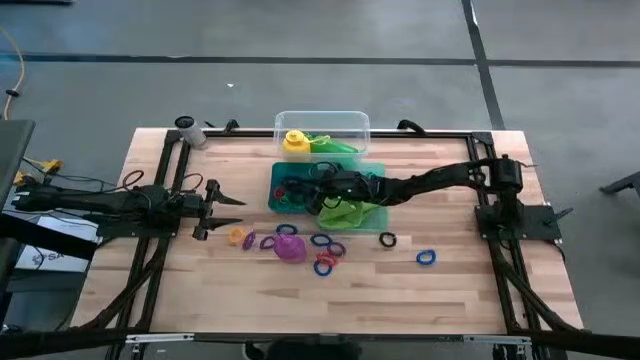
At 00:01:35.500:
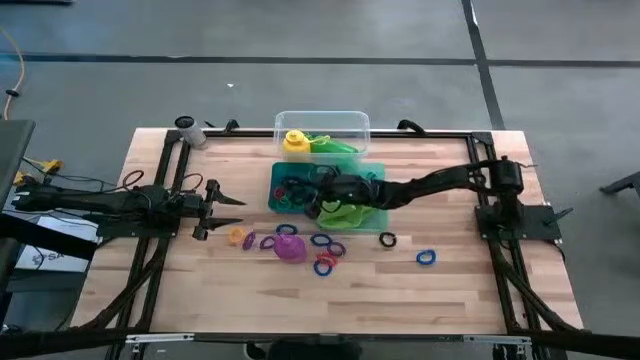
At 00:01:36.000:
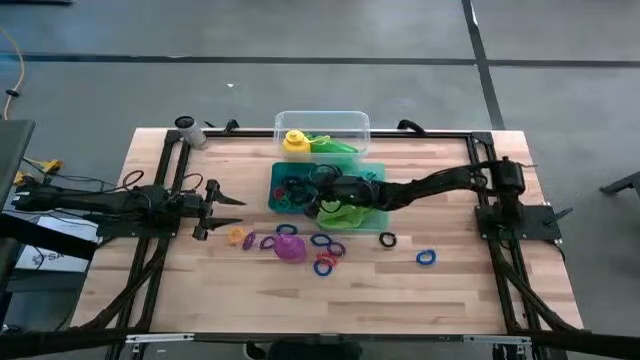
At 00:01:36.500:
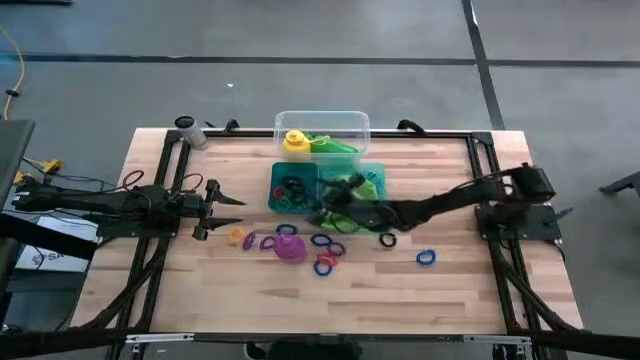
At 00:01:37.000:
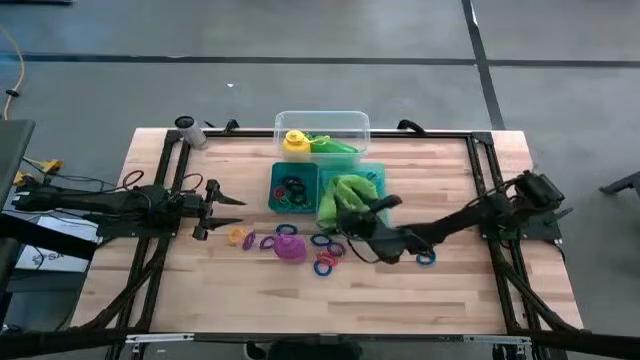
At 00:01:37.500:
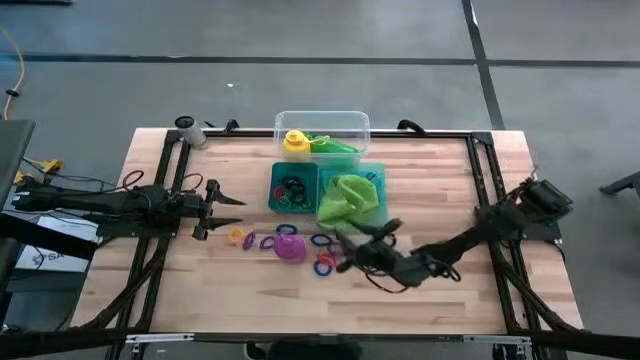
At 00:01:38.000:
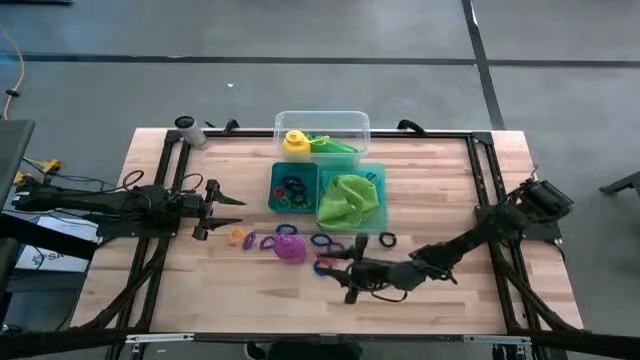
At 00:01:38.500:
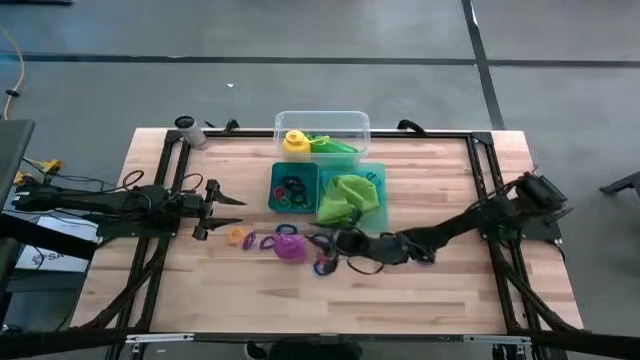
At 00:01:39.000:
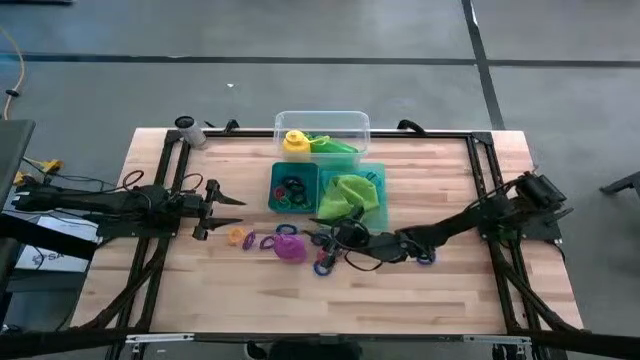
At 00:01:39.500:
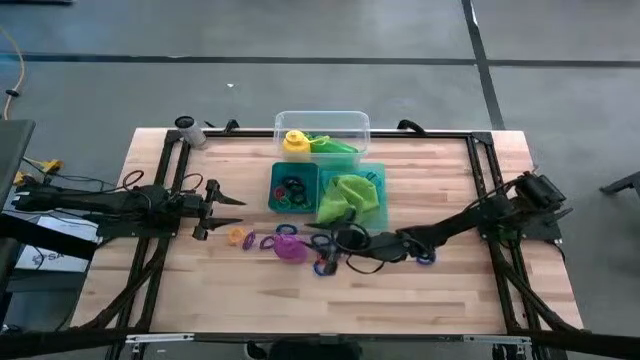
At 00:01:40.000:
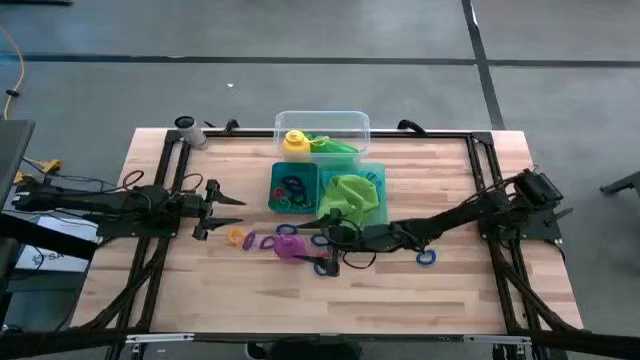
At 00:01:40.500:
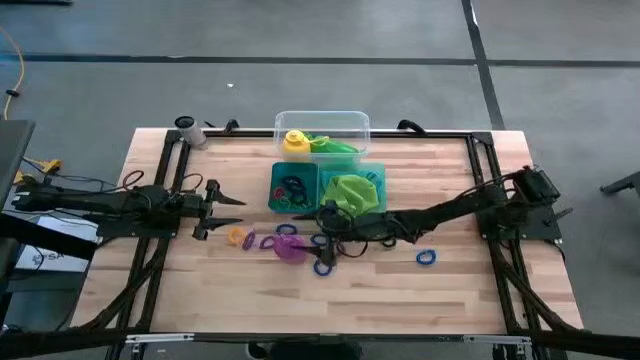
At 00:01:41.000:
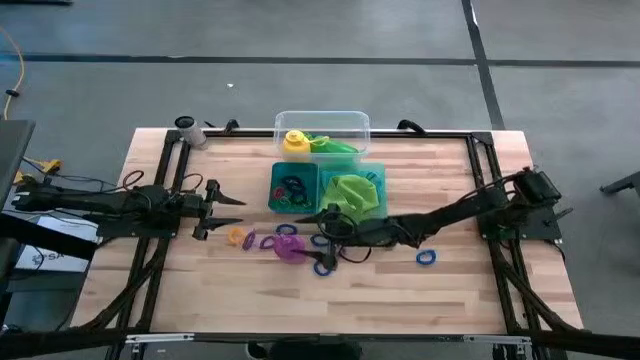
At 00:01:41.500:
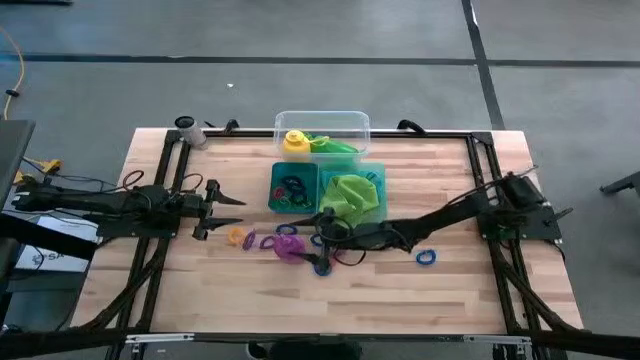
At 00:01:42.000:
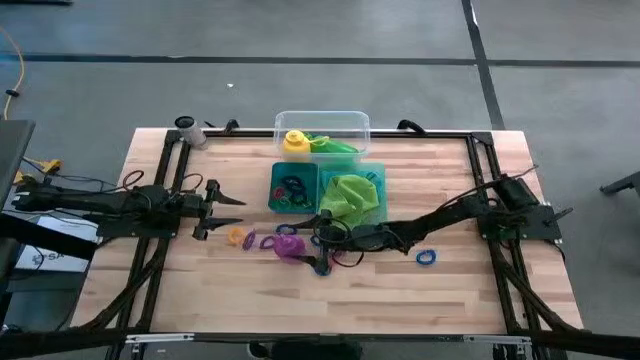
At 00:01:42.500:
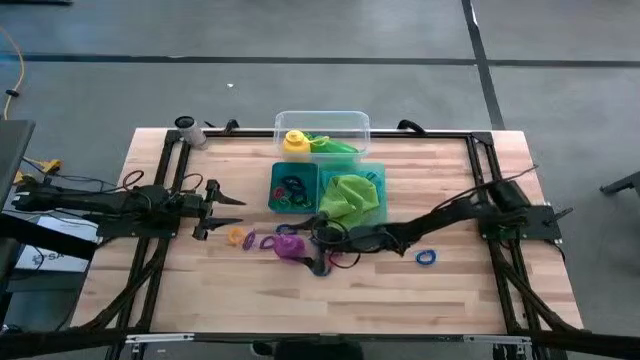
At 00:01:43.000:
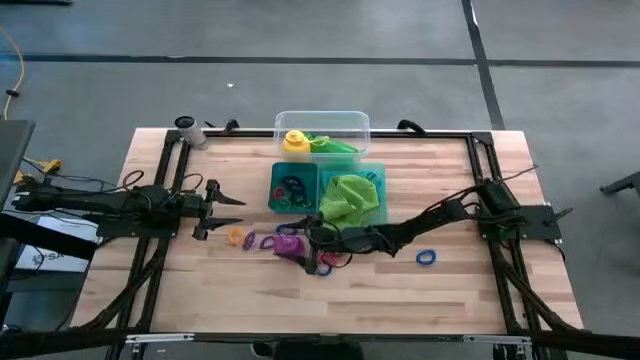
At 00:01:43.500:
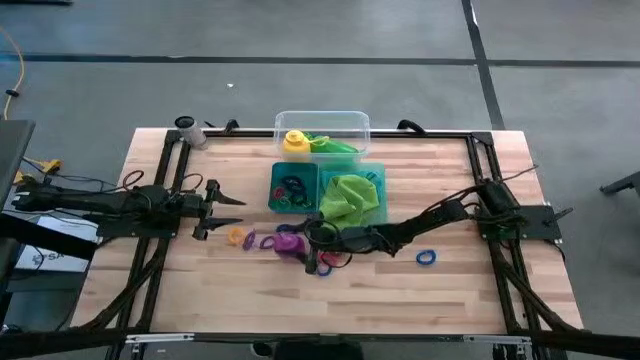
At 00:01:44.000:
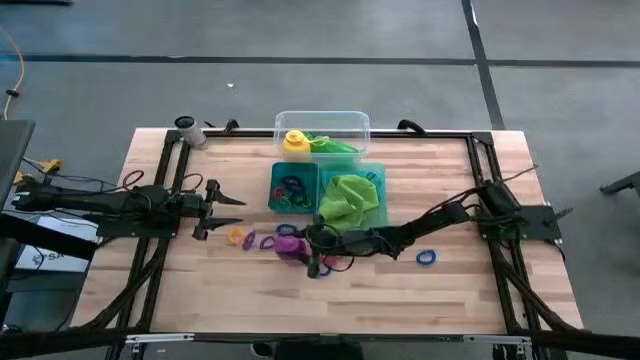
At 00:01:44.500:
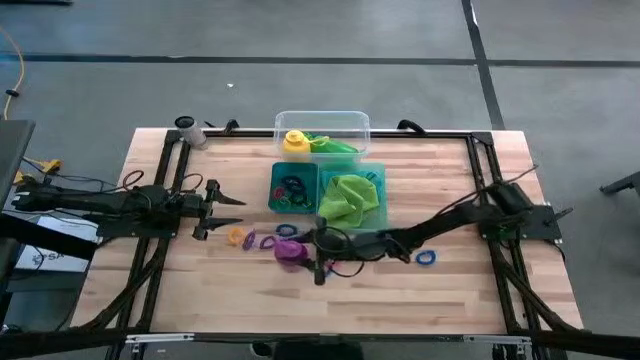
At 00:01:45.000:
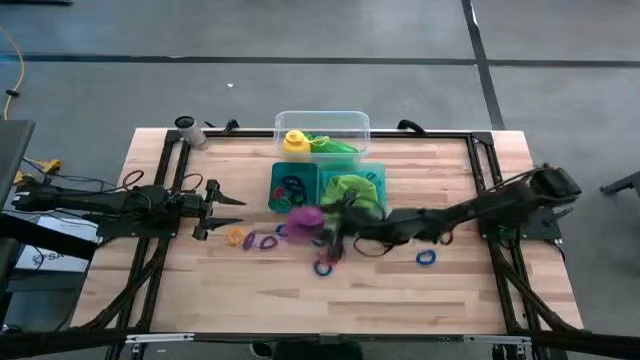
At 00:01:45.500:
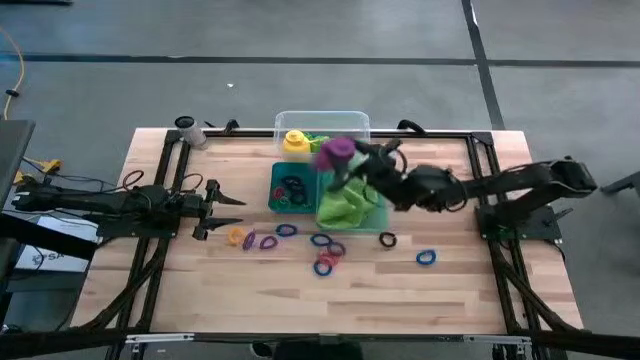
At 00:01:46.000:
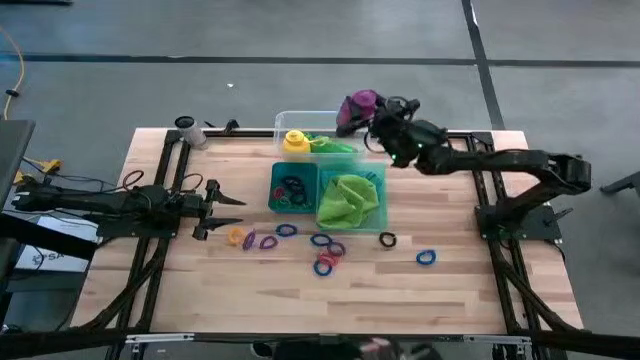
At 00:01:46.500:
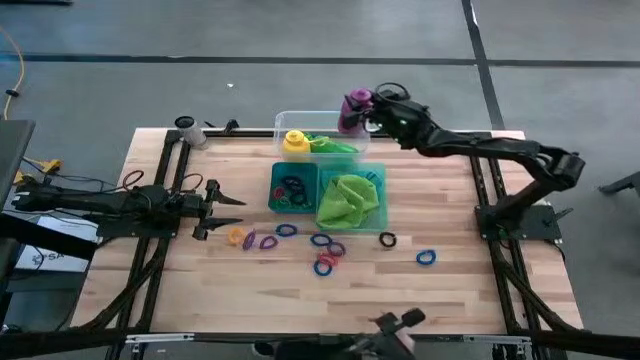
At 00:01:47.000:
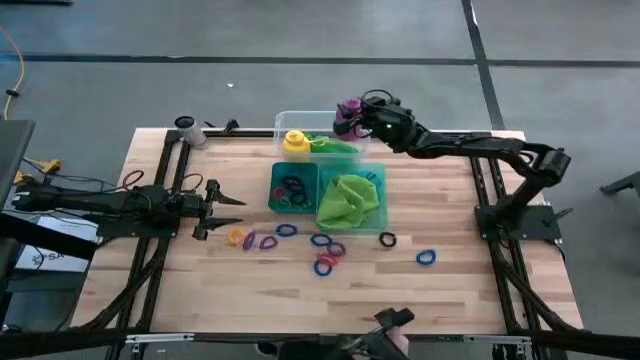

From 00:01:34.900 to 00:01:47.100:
Task: Pick & Place Sports Items
Put the purple tumbler into the transparent bin

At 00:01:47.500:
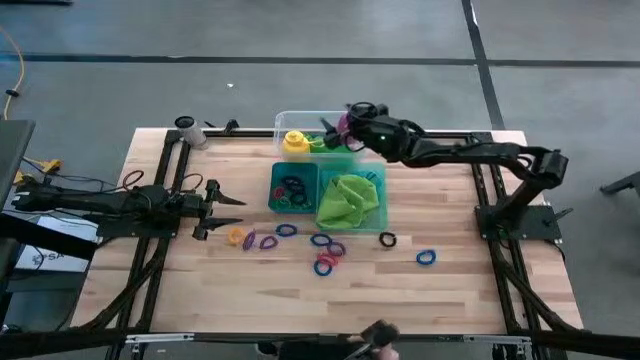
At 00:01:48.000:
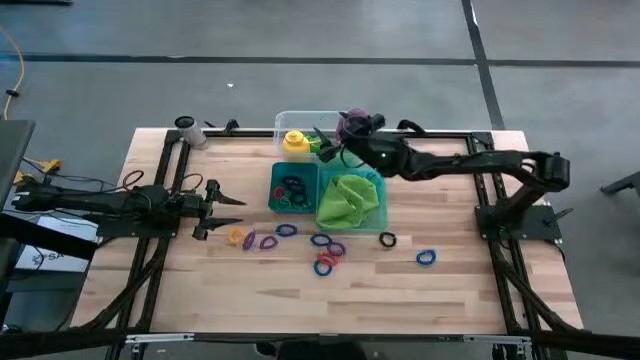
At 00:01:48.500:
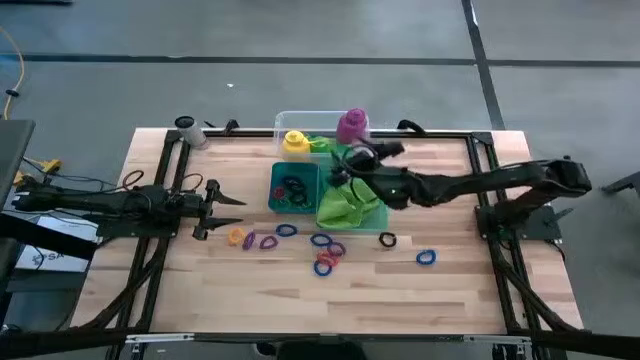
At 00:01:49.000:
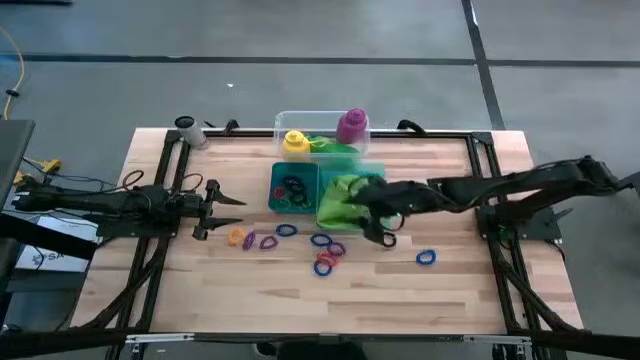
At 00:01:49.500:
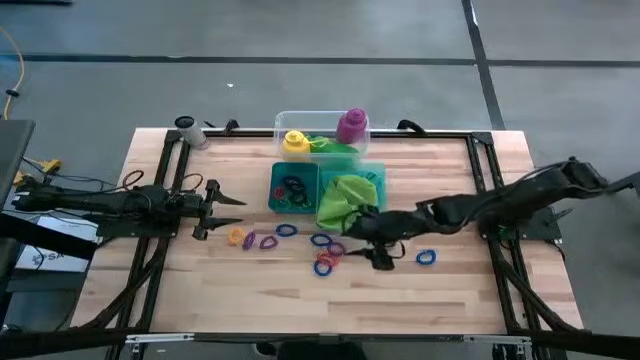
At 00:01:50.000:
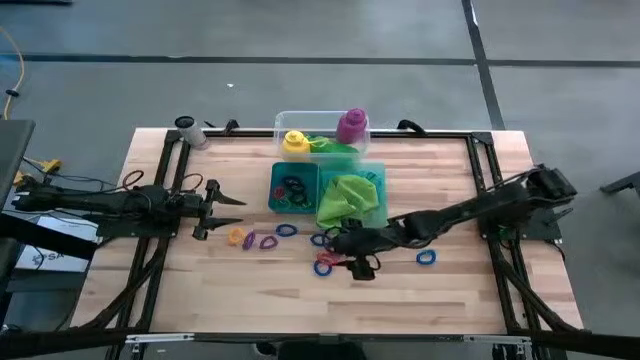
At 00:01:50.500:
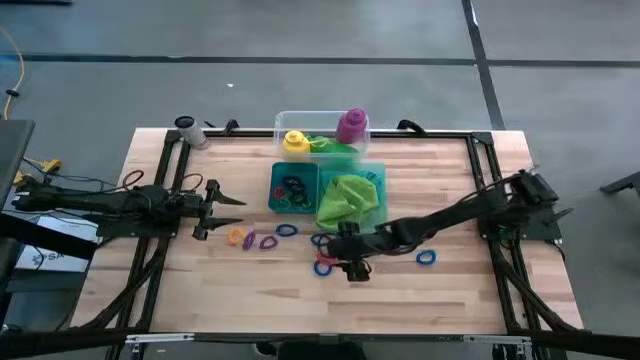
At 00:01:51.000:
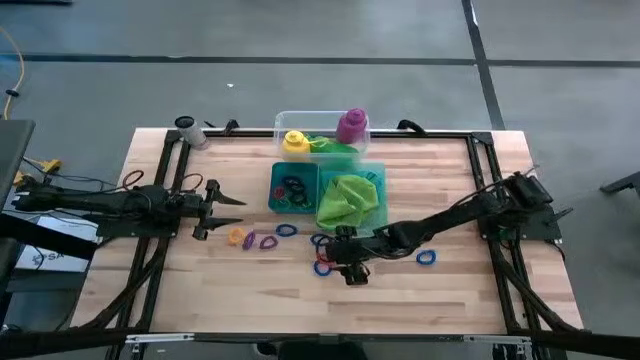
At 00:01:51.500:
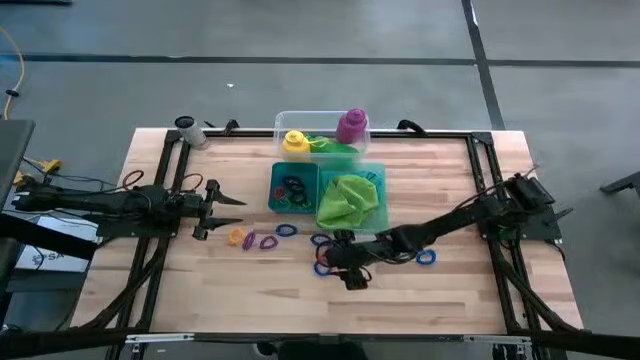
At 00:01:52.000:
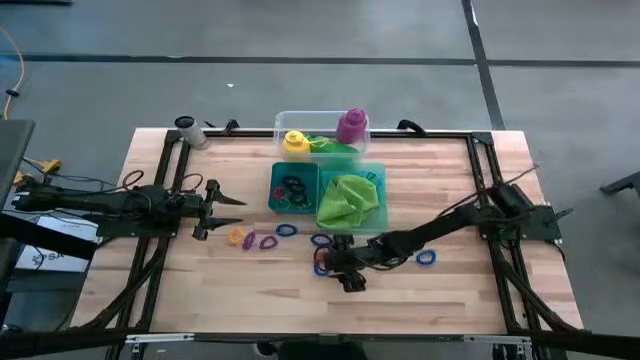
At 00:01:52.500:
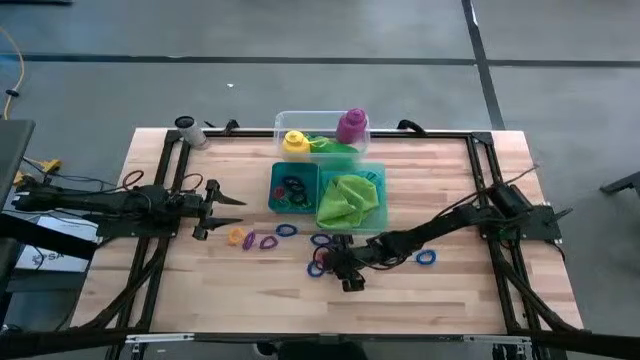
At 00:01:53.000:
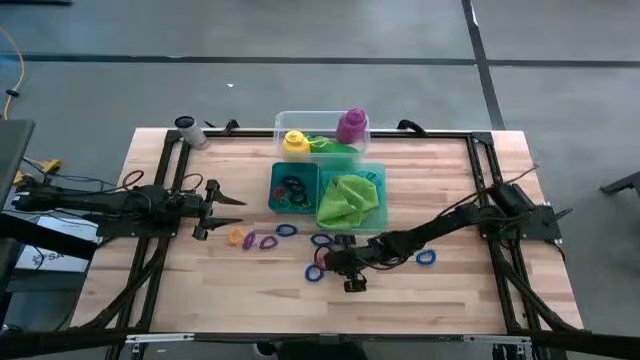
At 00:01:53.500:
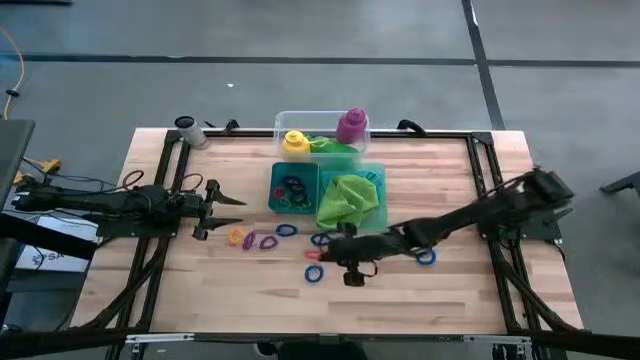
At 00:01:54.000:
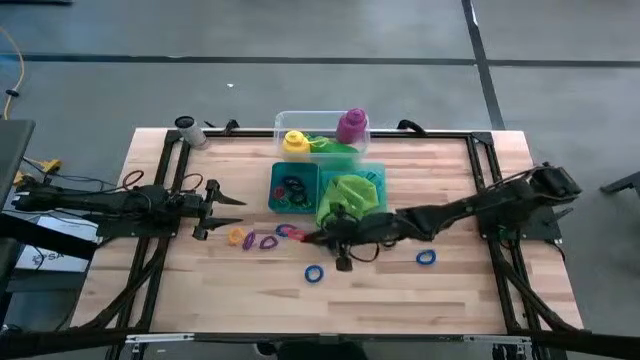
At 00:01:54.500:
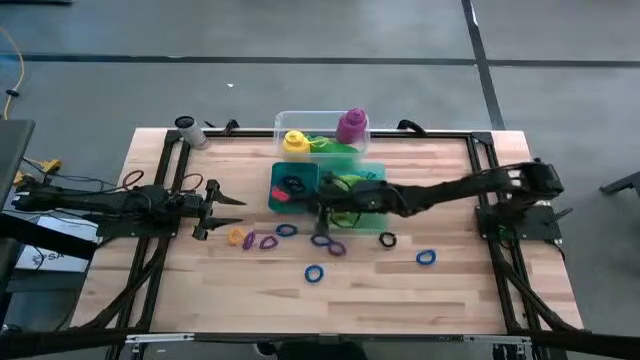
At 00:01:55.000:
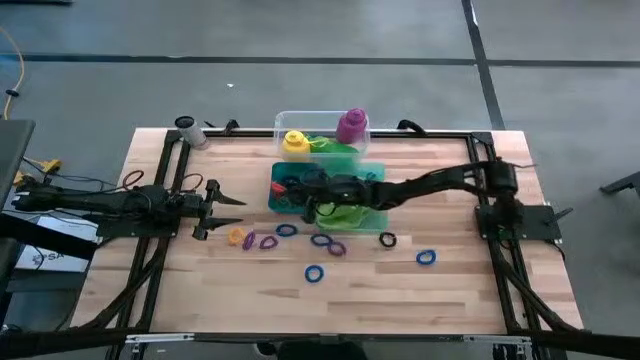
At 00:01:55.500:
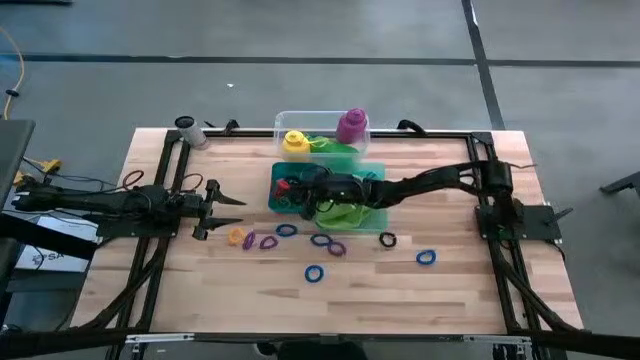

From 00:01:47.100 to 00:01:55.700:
Put the orange spring keychain into the transparent bin
